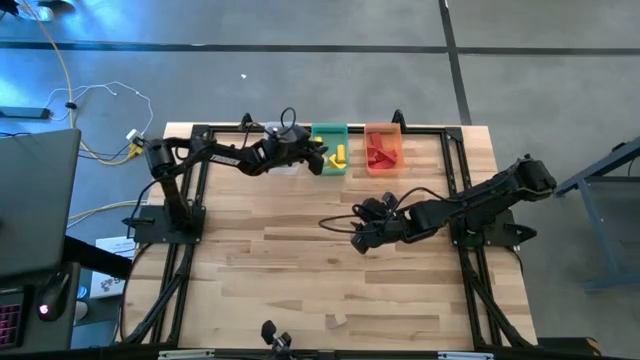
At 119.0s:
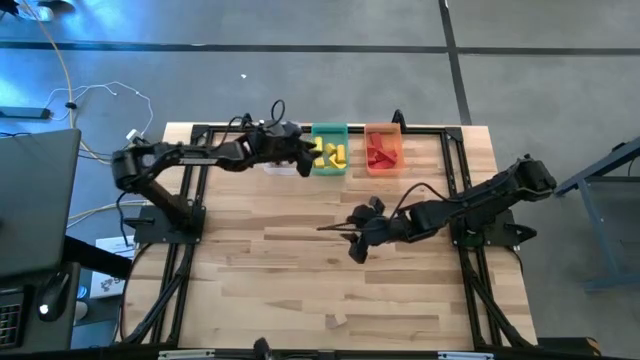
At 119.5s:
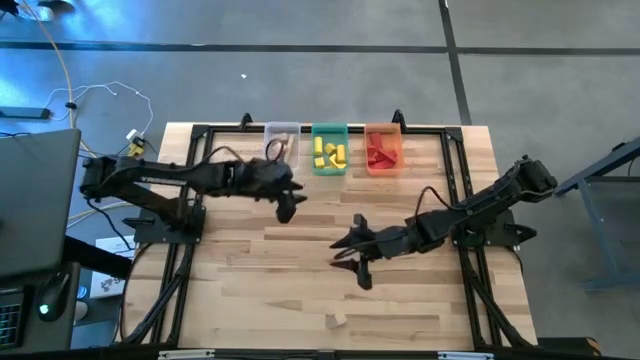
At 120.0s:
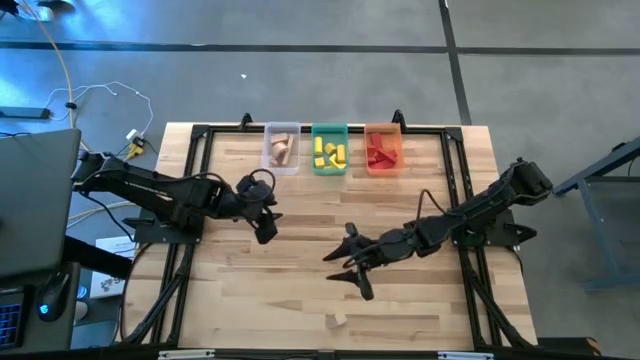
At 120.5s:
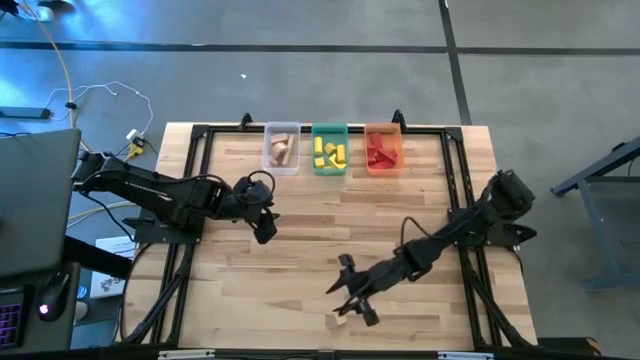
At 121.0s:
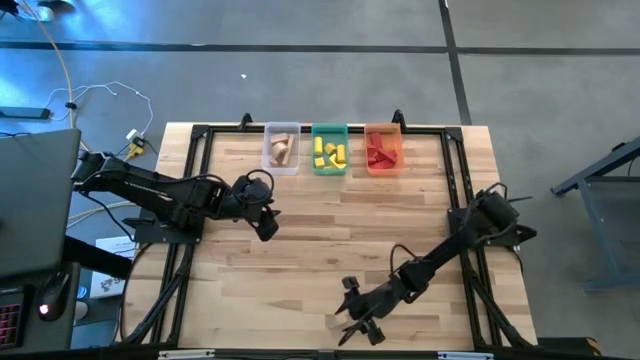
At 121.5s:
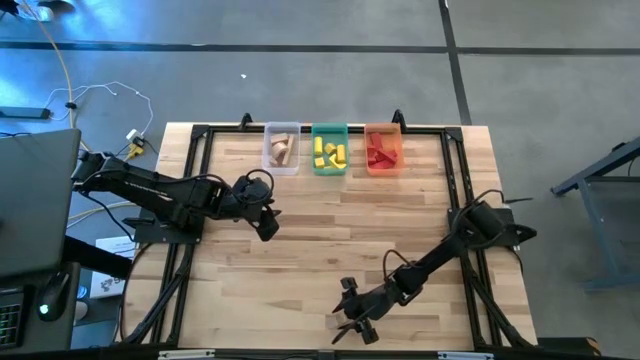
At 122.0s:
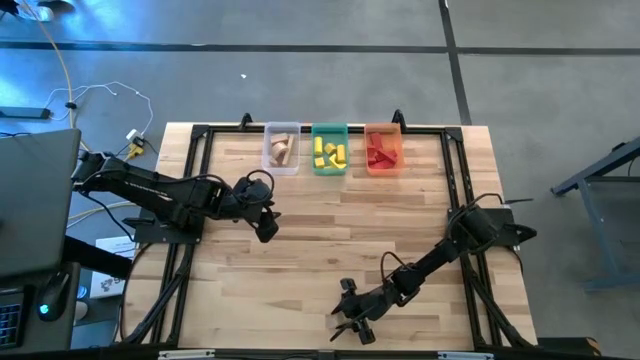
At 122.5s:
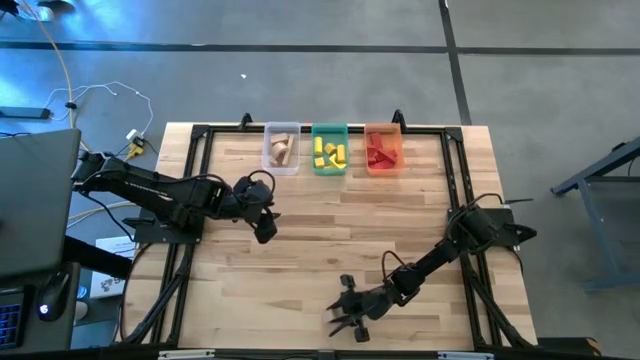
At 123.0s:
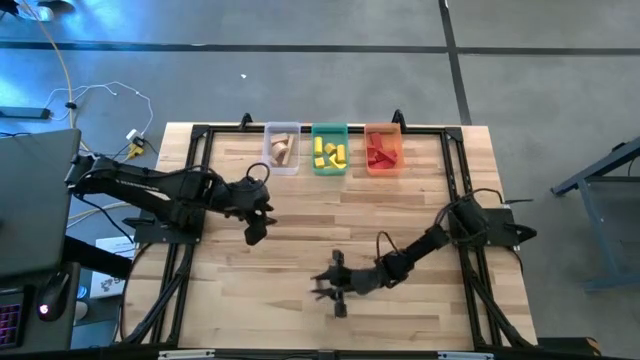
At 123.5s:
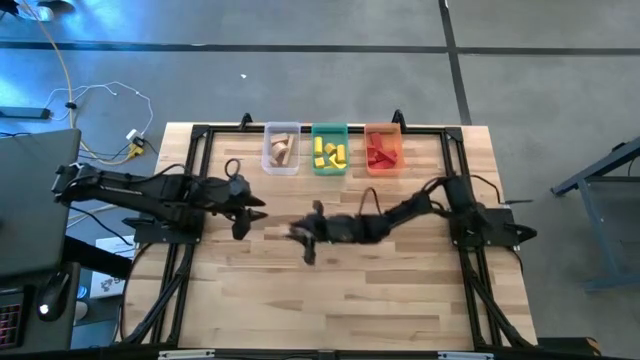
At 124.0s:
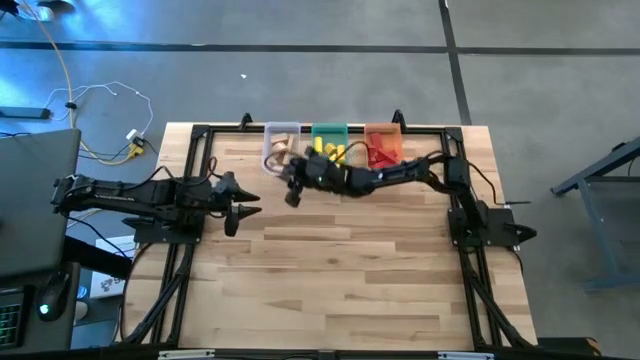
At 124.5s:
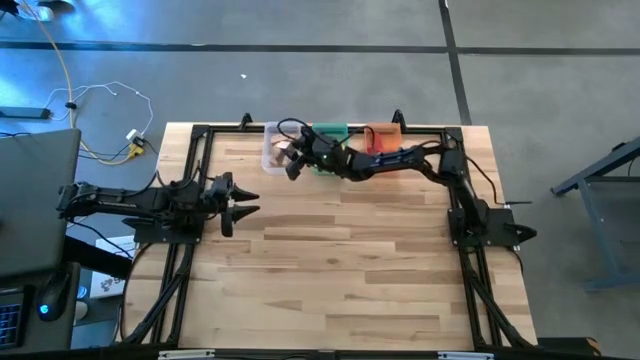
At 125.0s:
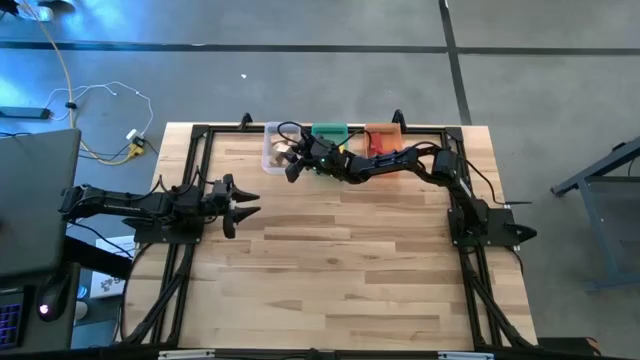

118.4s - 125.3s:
Task: Sort & place blocks by color
Put the brown block into the white transparent bin

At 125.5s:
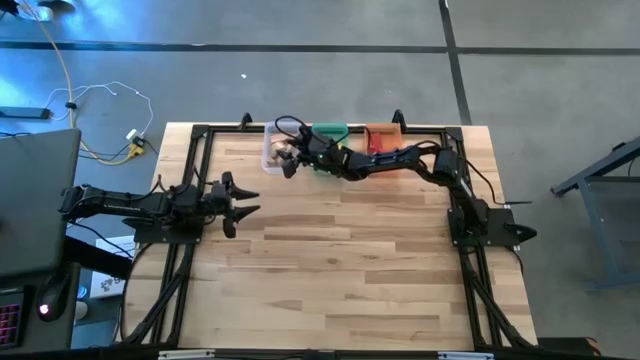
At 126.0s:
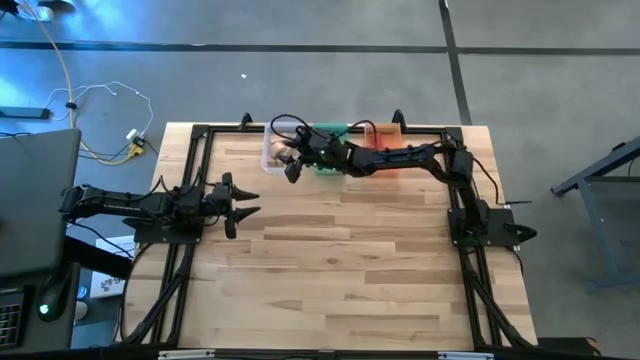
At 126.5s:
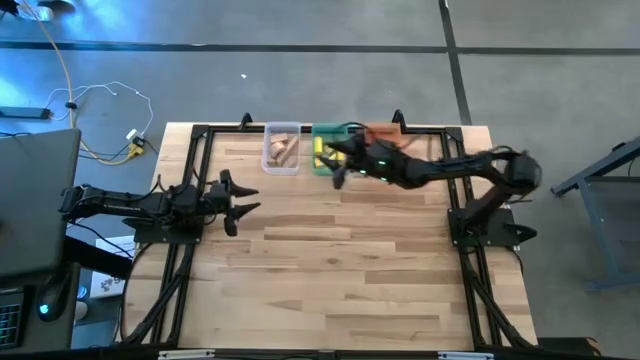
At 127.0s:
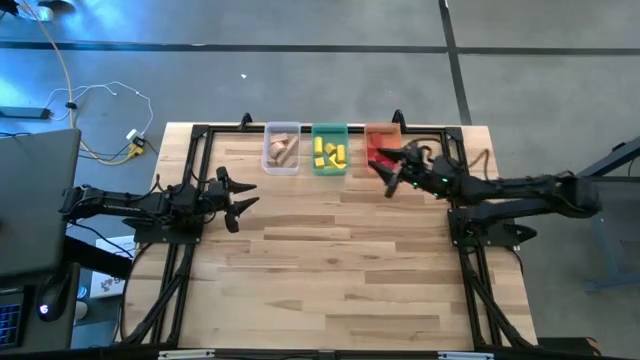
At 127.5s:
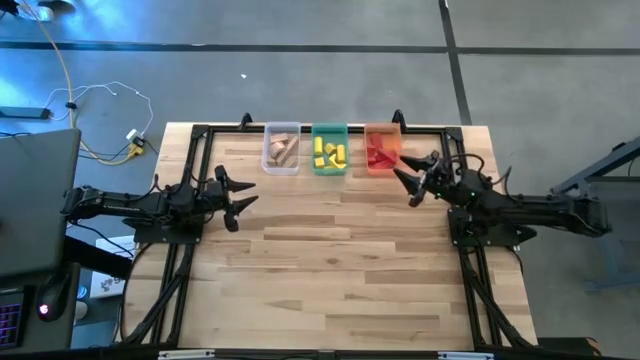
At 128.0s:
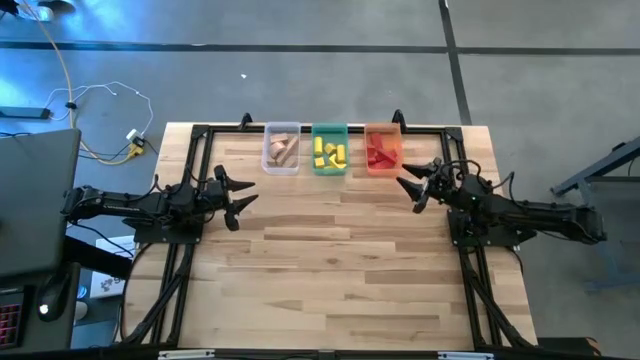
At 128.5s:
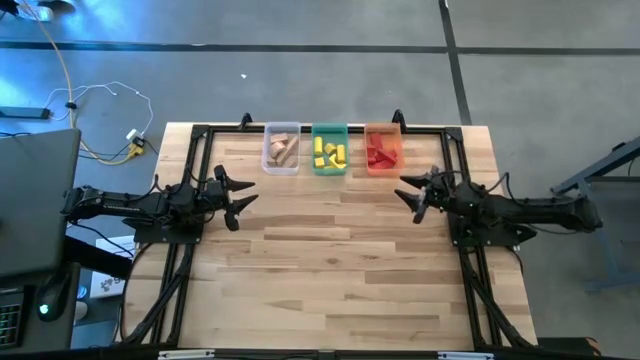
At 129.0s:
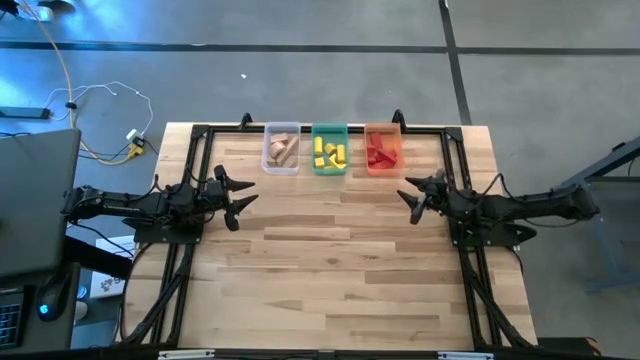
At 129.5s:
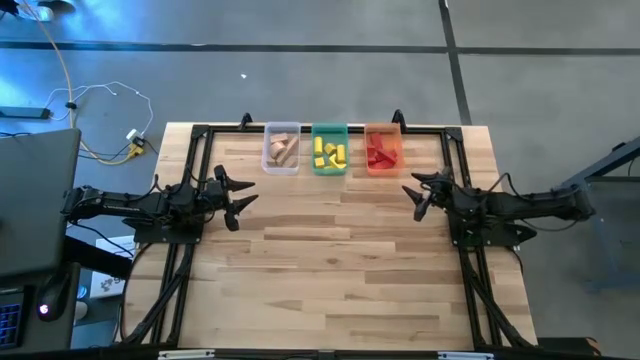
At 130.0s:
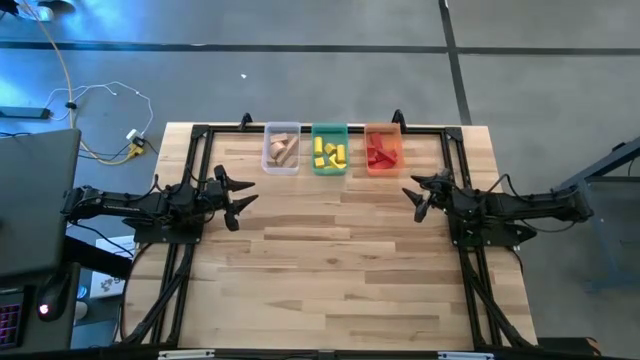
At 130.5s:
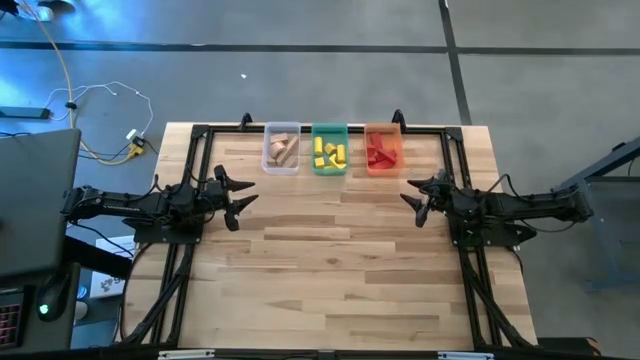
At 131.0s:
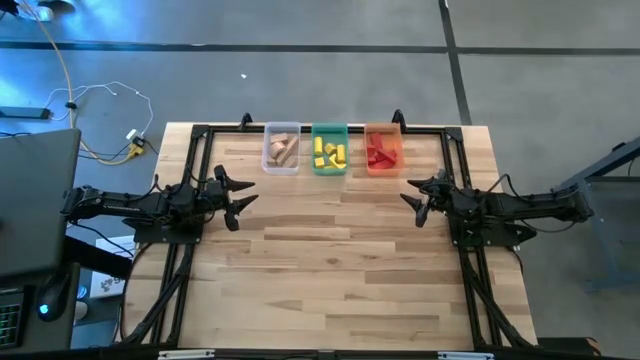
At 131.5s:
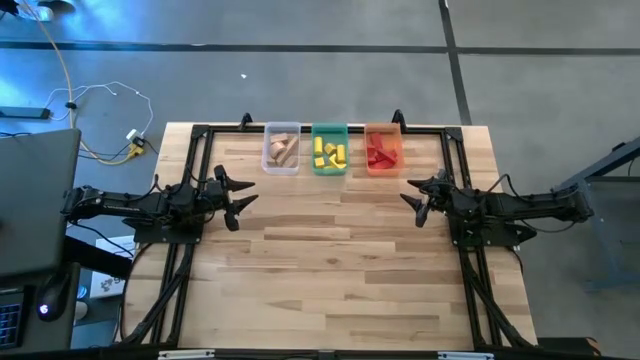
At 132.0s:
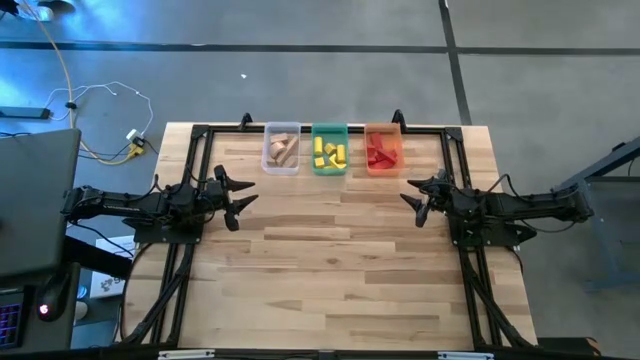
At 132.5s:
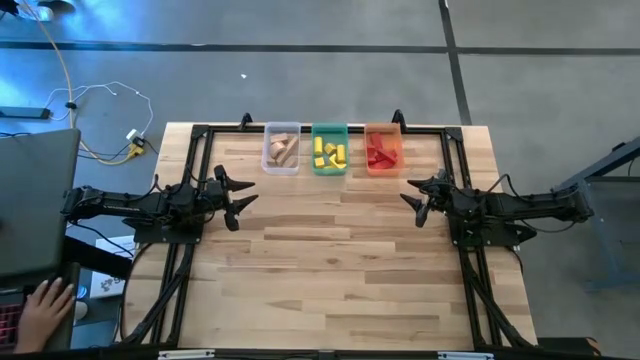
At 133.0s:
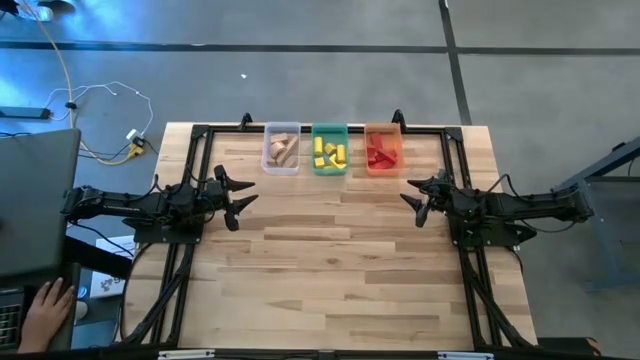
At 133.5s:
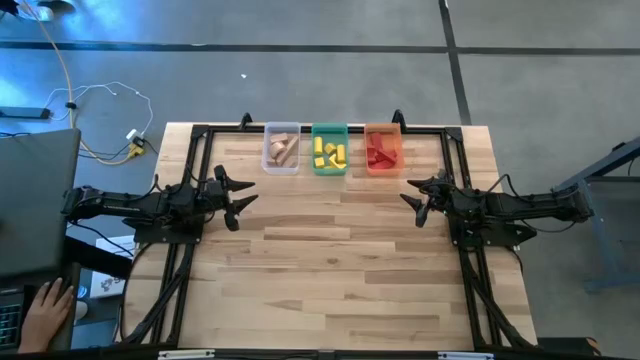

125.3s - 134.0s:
Return to Home Position

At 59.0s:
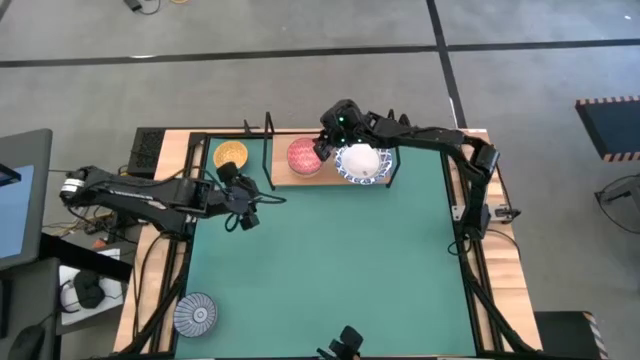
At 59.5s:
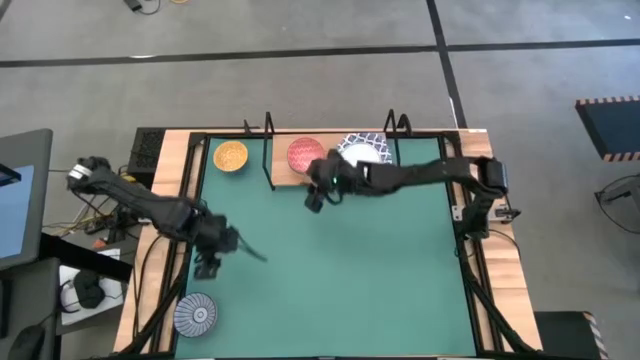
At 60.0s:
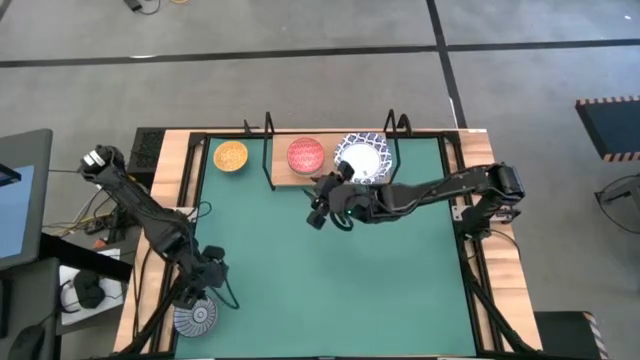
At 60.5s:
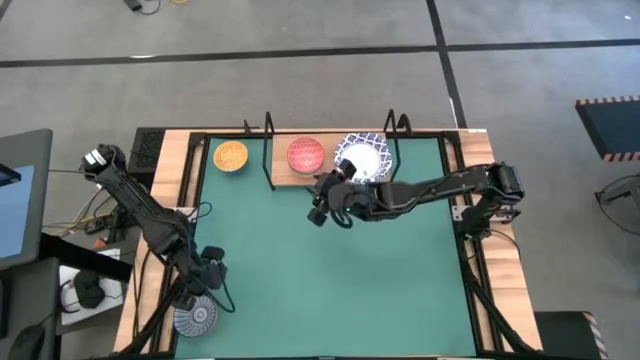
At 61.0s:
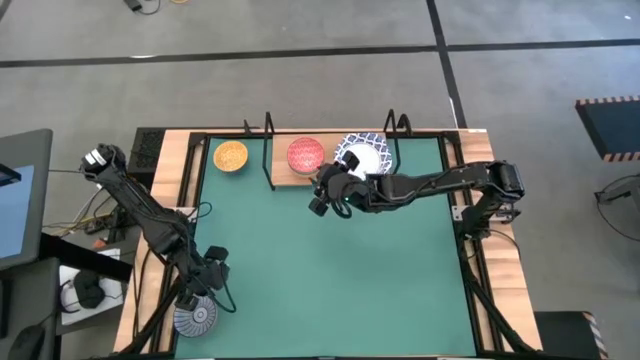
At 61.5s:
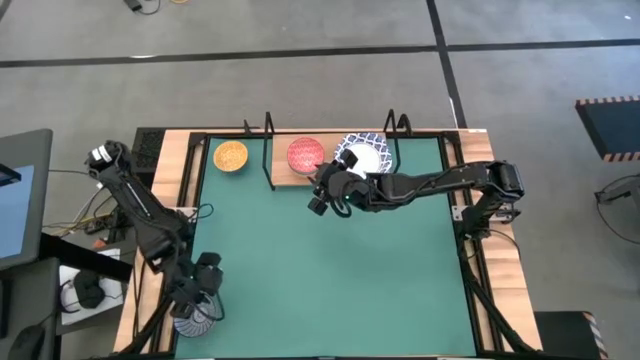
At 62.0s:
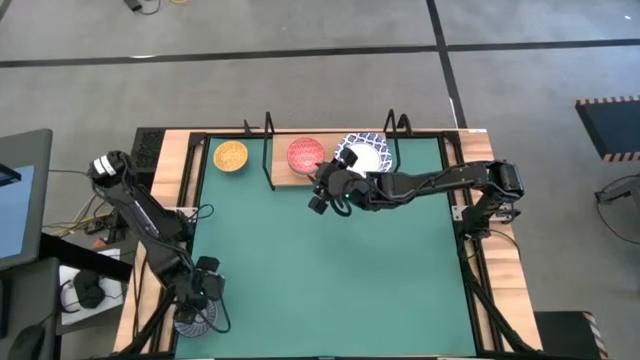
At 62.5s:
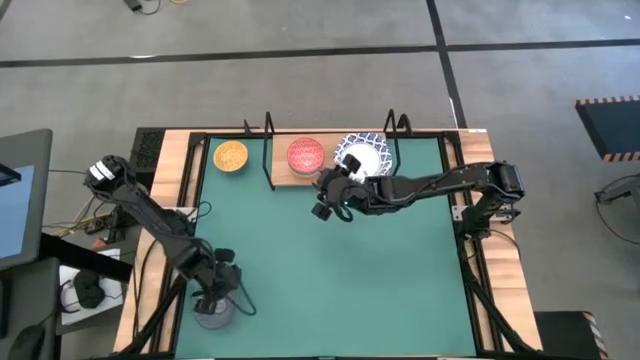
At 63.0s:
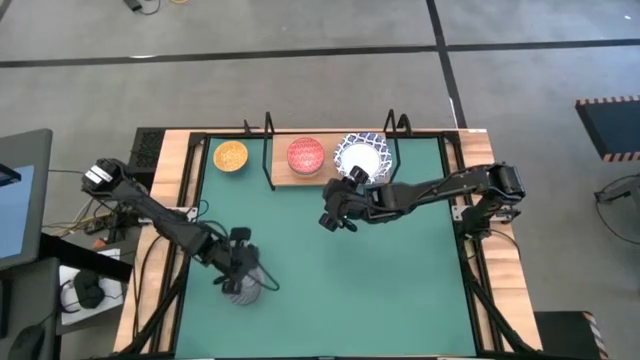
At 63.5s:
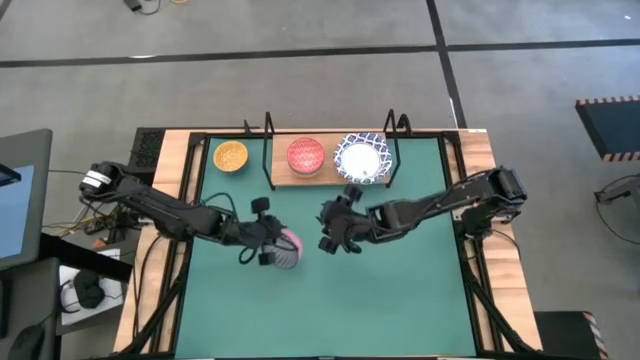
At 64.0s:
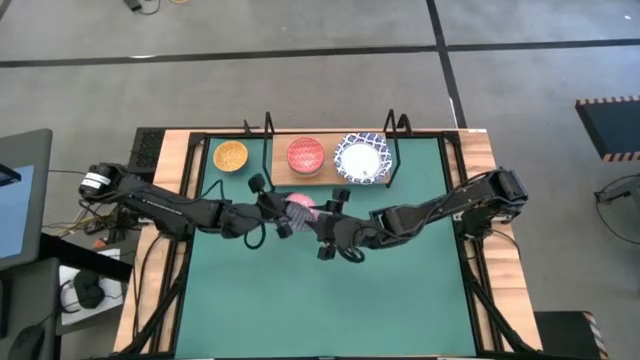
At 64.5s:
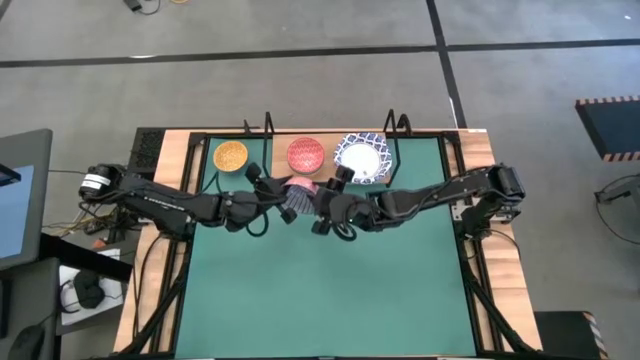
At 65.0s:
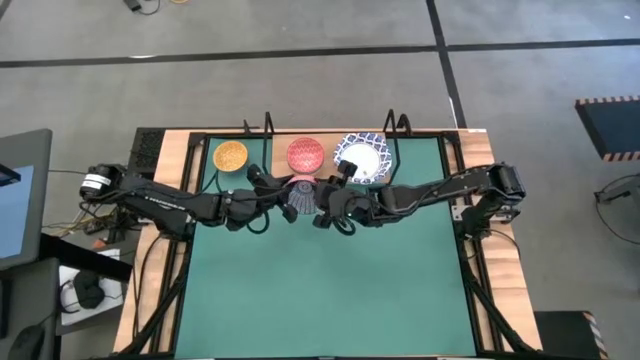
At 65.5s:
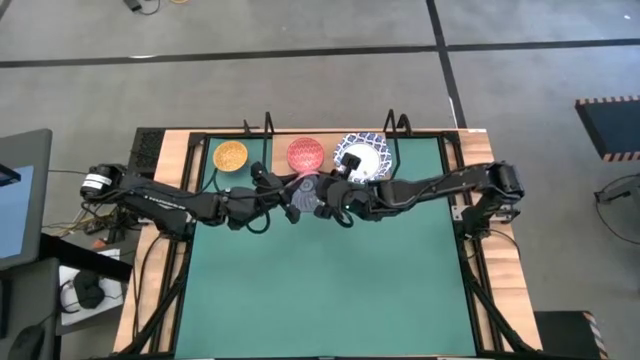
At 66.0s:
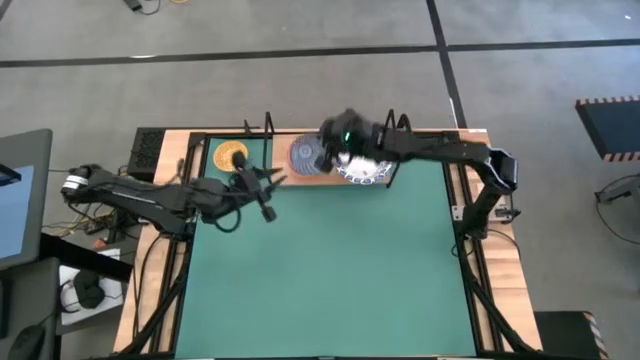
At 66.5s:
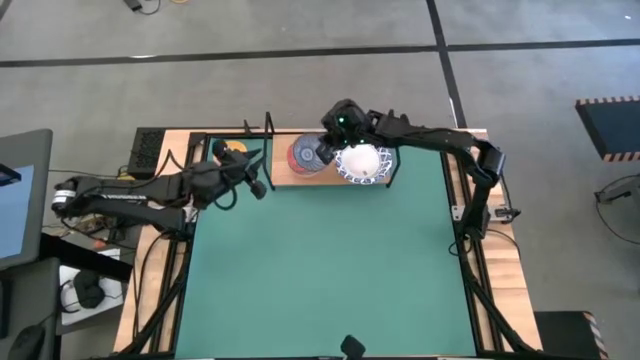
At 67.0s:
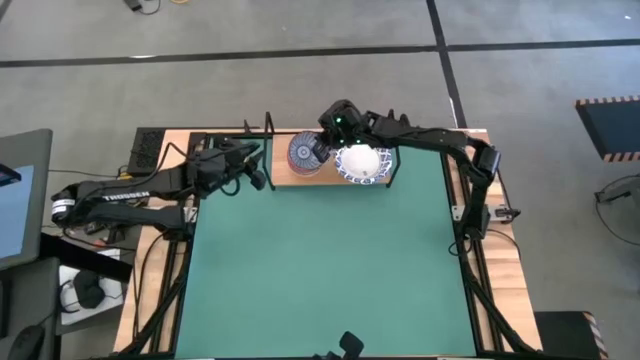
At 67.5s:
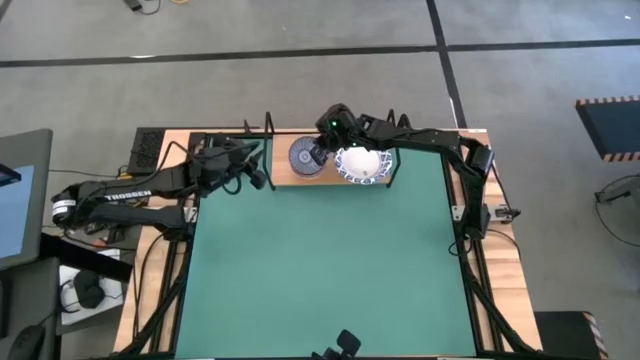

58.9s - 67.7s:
Task: Place and stack bowls onto a shelf
Stack the blue striped bowl on top of the red patterned bowl on the shelf
